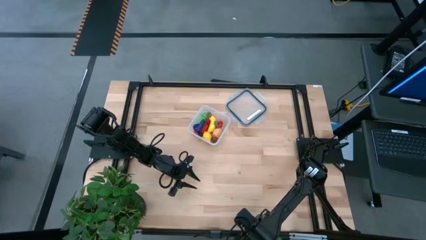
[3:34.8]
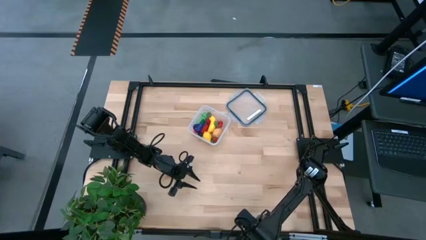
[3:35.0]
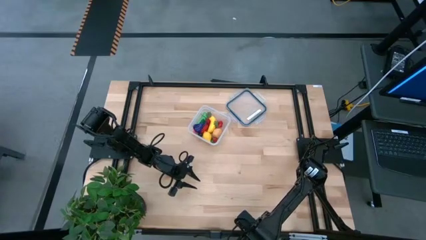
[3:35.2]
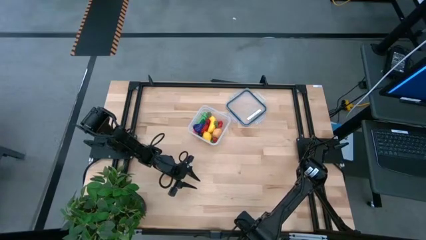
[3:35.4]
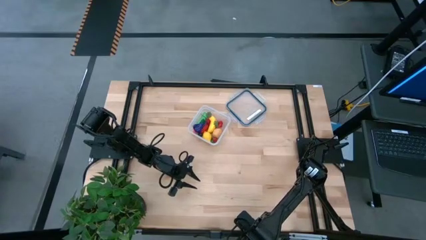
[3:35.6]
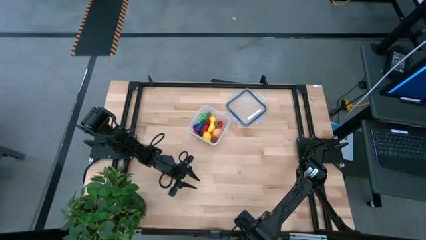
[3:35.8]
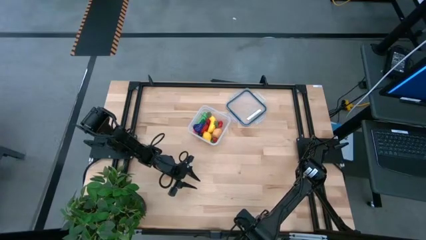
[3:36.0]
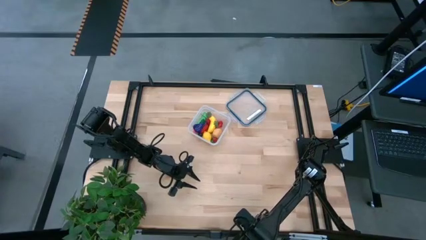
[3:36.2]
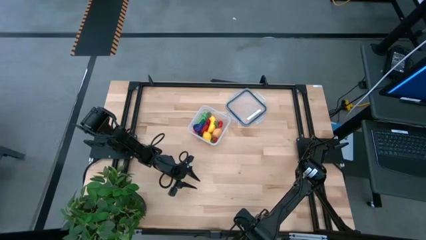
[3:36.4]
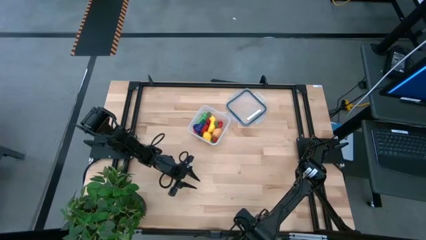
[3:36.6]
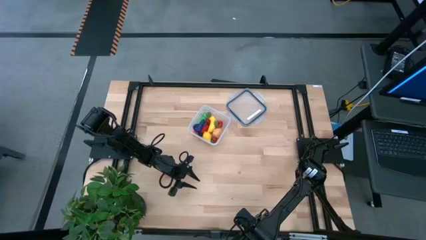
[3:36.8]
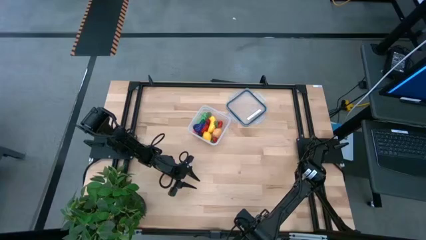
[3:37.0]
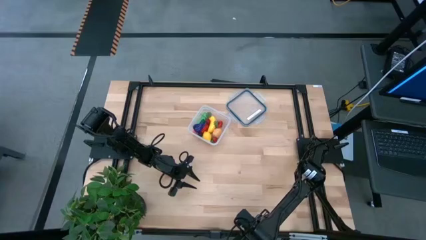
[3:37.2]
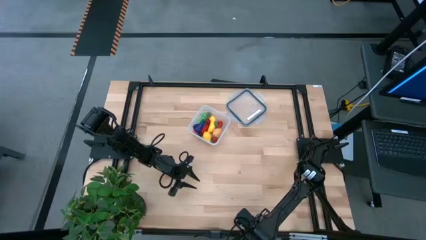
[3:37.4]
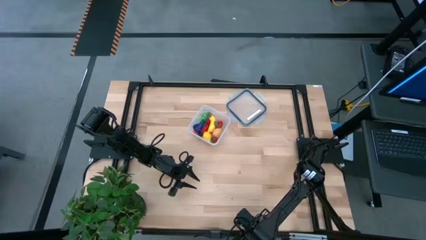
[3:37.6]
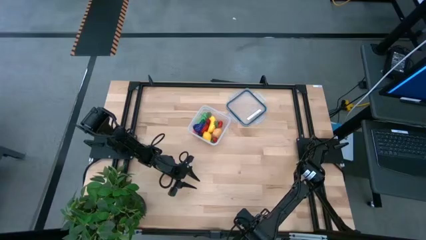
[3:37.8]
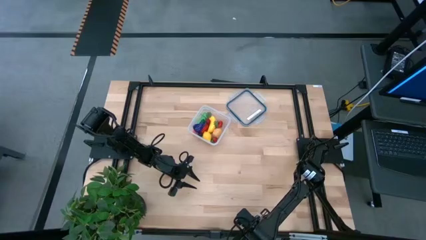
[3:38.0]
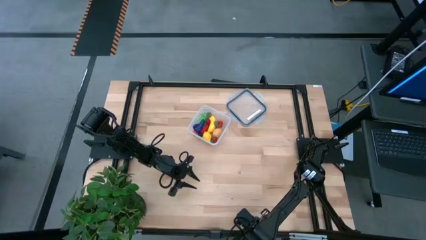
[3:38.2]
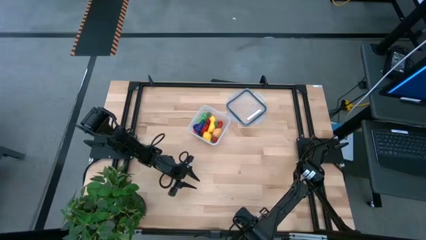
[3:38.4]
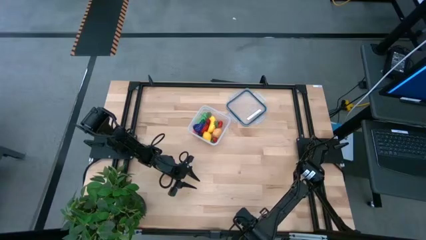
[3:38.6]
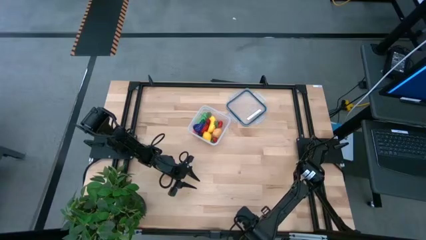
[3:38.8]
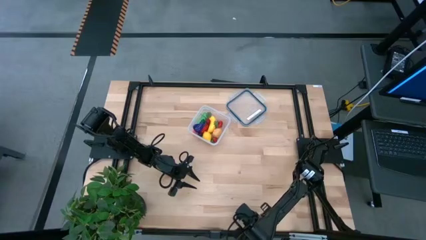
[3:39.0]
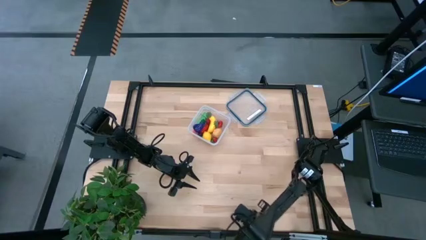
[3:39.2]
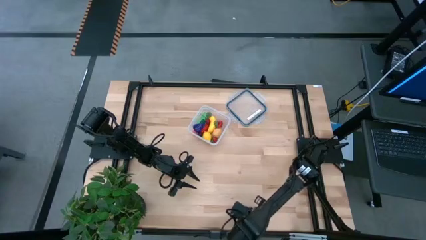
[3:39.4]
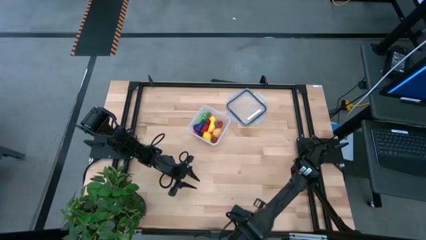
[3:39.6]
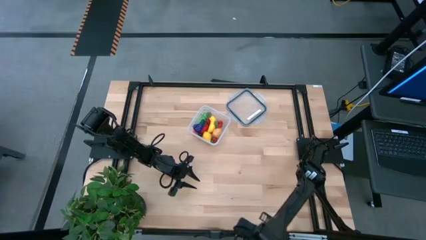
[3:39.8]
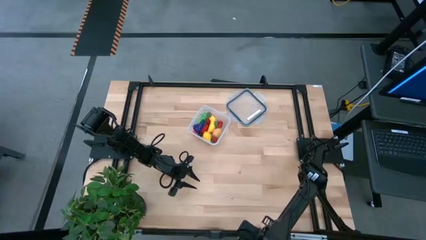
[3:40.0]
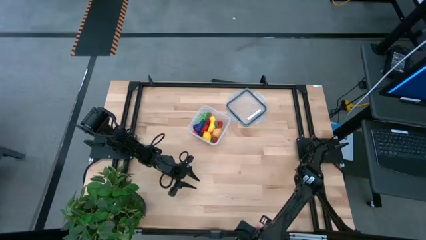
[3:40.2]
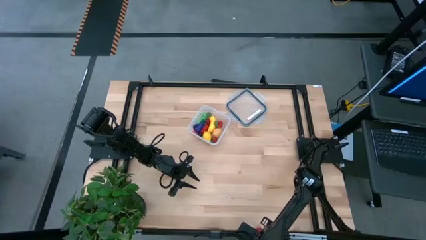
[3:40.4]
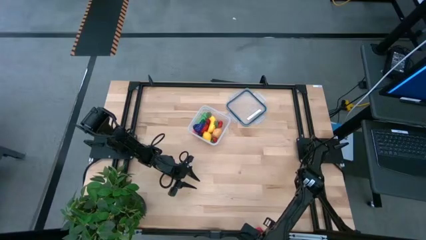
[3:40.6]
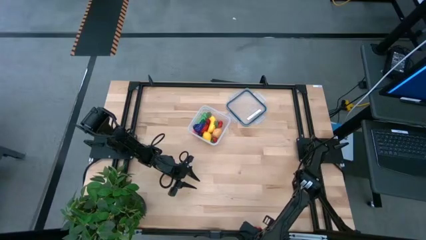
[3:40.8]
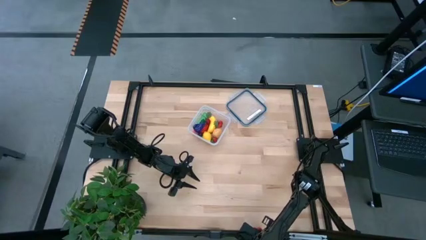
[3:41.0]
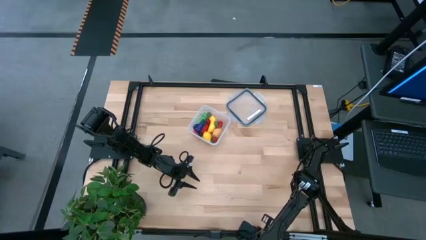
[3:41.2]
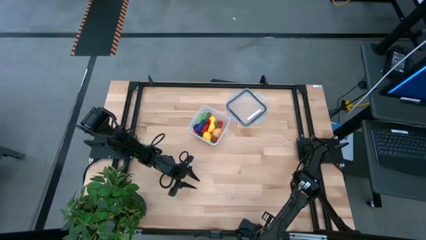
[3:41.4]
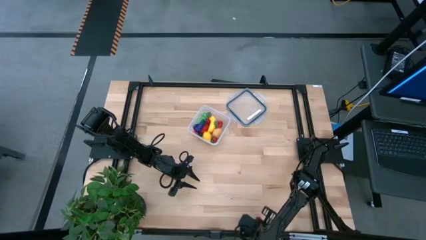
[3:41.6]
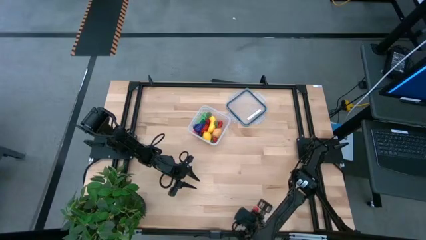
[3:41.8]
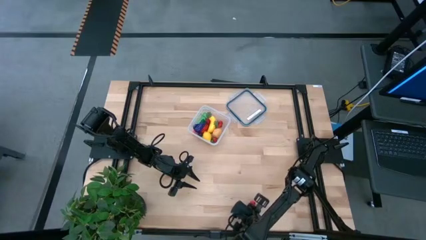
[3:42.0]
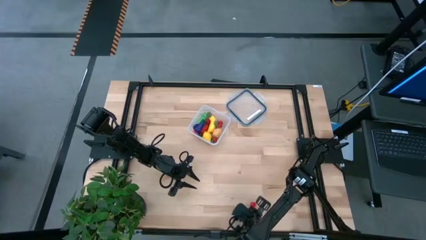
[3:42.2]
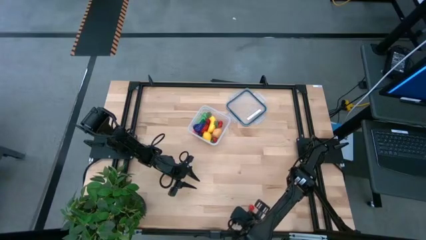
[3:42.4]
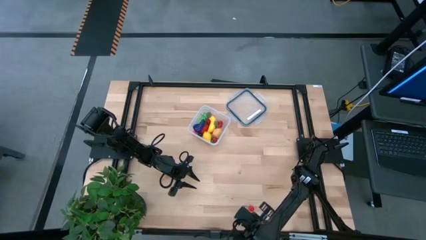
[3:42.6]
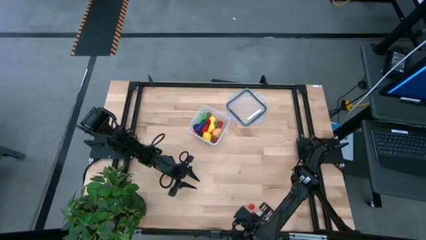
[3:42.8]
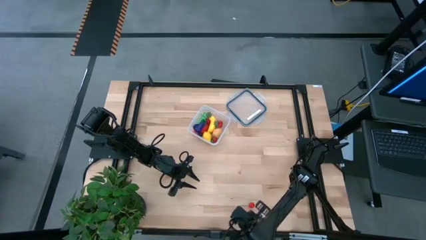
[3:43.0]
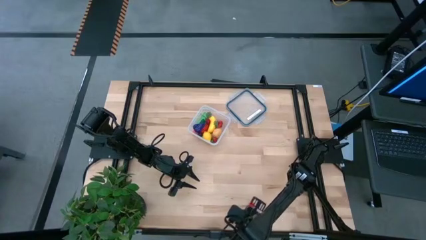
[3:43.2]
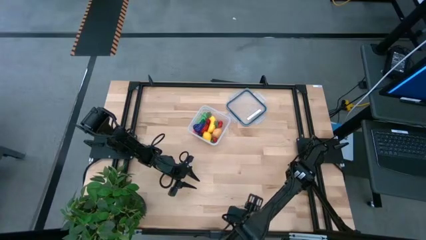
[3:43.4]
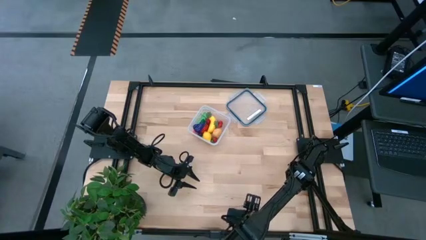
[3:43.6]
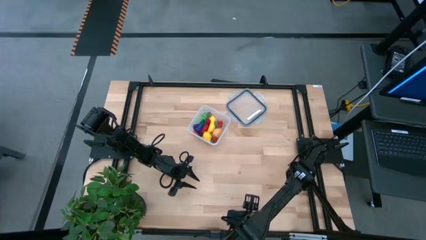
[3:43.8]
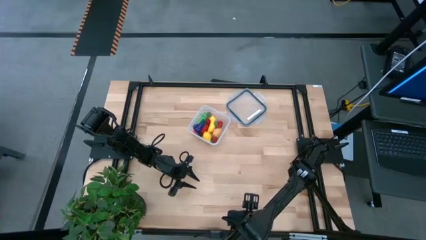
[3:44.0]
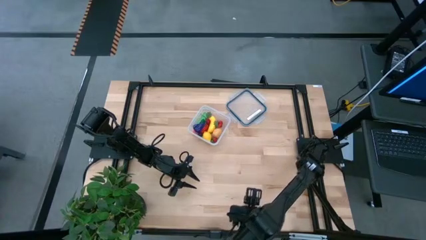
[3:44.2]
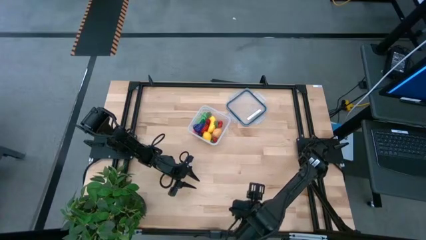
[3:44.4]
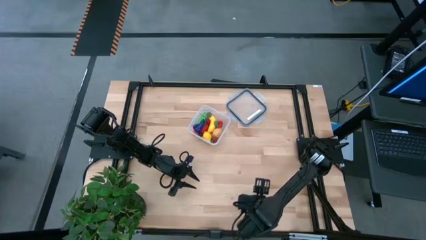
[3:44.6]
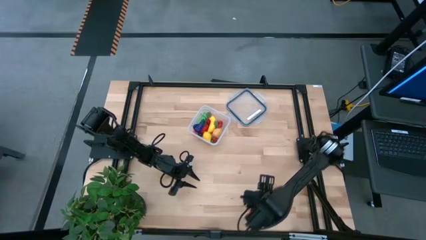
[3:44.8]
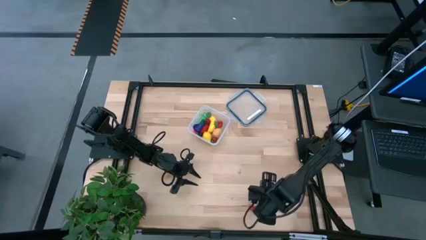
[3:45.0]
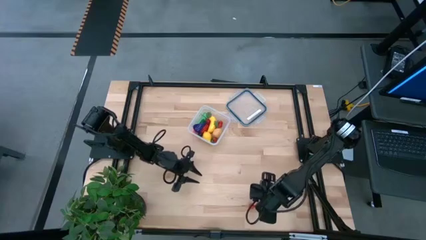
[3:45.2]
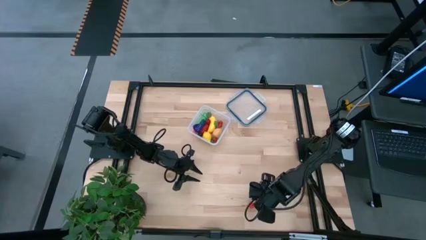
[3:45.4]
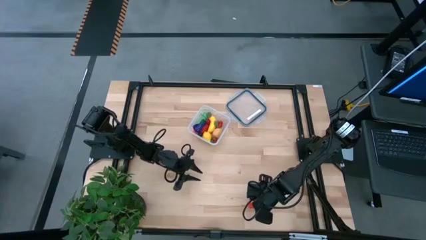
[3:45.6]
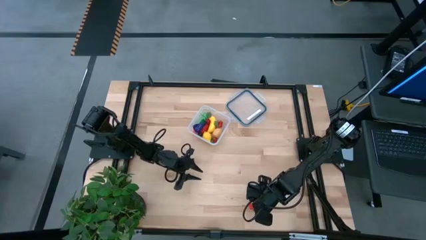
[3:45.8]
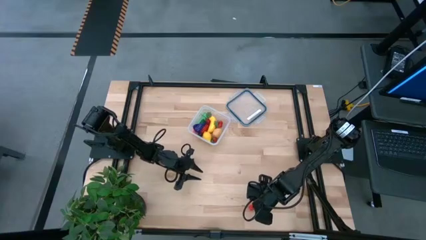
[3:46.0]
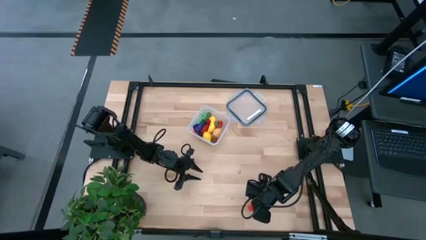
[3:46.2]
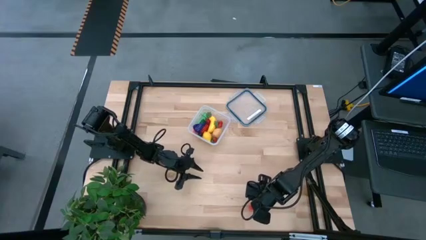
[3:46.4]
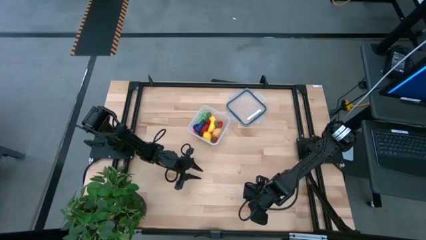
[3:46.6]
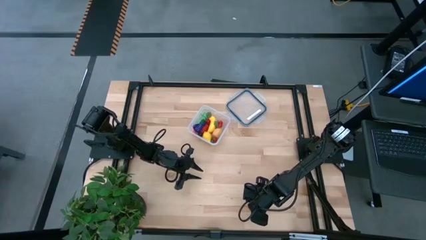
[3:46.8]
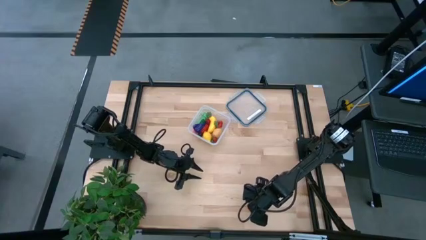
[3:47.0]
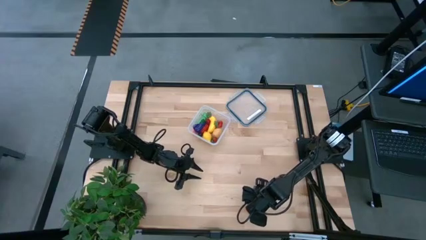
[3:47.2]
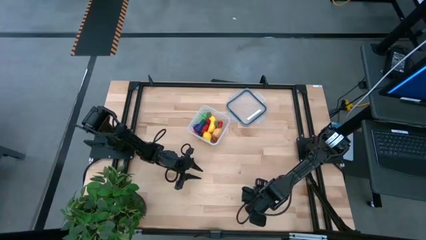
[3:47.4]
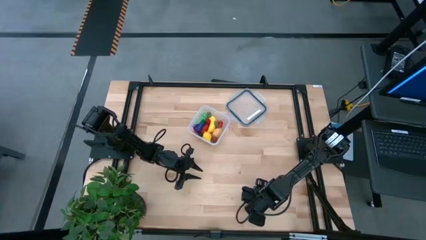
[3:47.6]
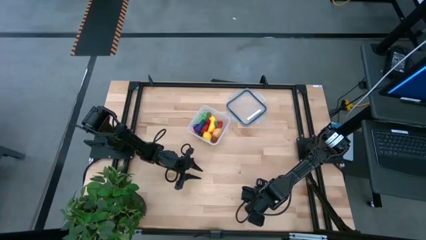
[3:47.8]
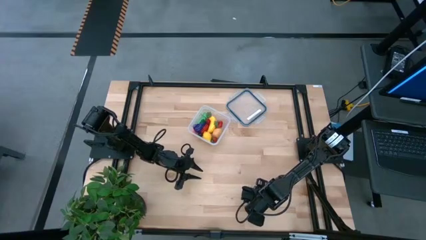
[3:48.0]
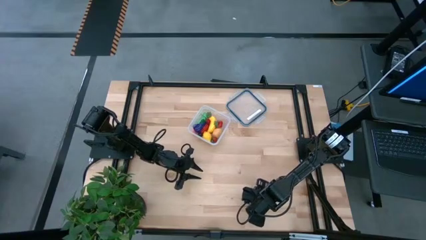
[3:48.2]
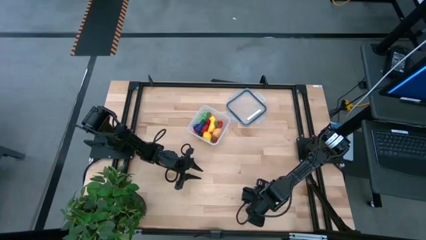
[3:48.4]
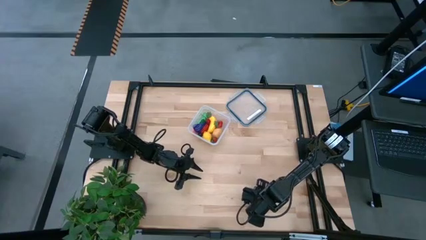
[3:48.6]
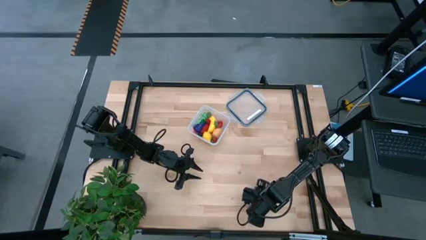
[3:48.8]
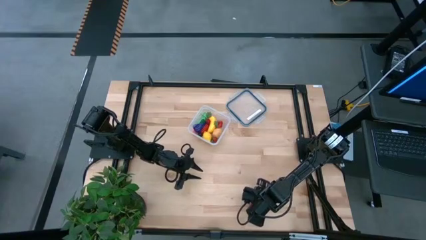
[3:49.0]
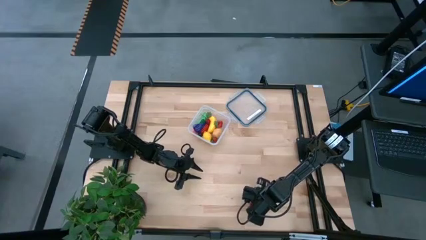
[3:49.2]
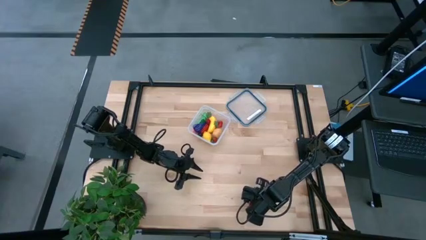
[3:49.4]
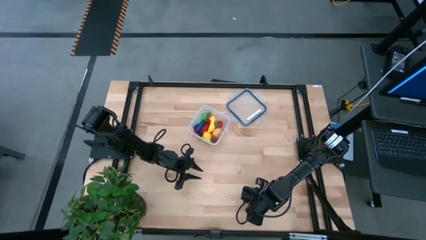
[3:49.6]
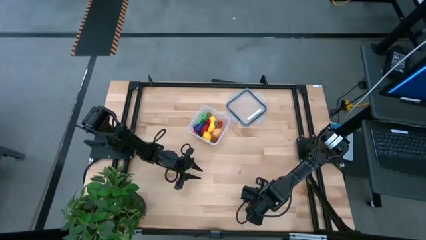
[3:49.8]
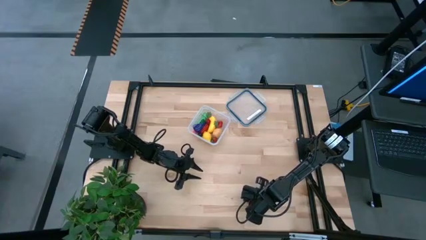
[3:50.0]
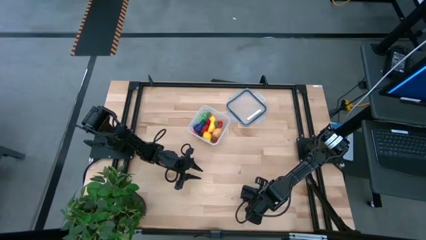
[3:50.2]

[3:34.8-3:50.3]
Task: Pick and placing Produce into tupperware
Put the red cherry into the transparent container

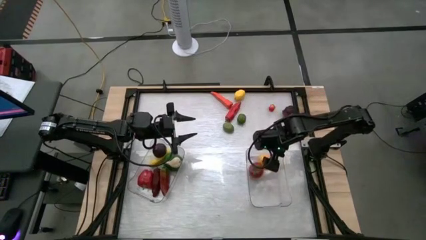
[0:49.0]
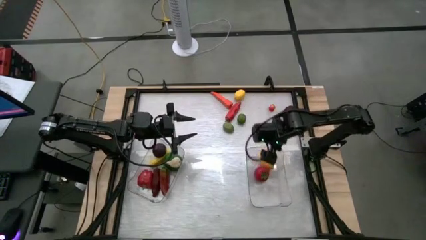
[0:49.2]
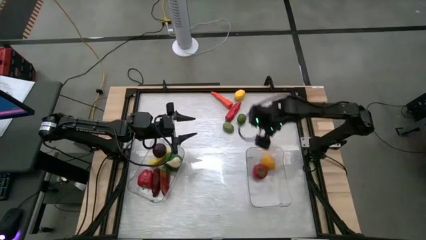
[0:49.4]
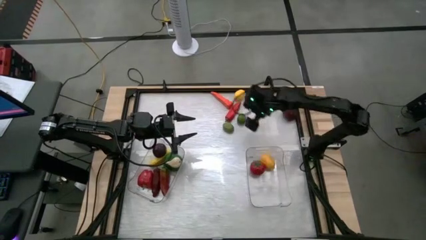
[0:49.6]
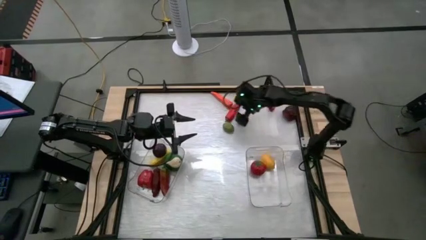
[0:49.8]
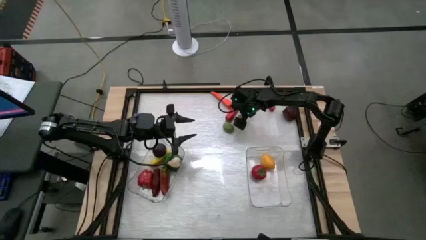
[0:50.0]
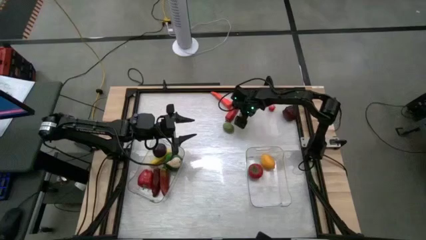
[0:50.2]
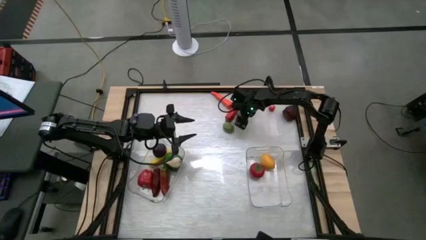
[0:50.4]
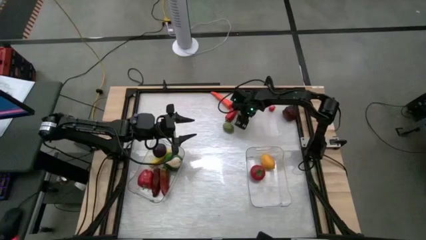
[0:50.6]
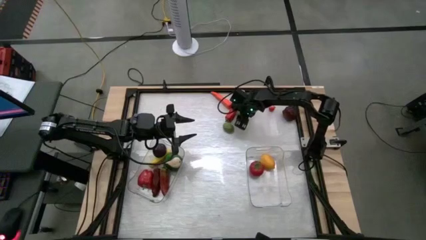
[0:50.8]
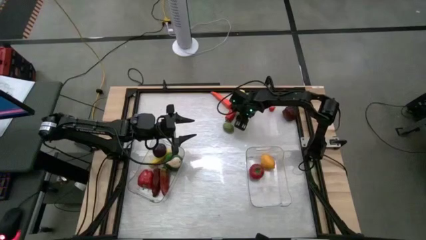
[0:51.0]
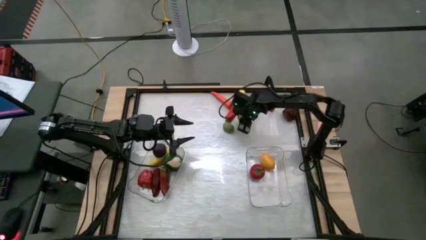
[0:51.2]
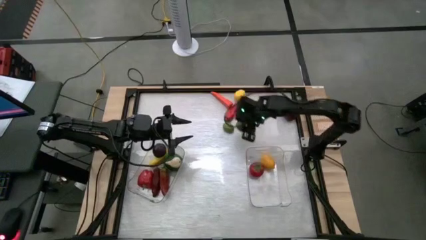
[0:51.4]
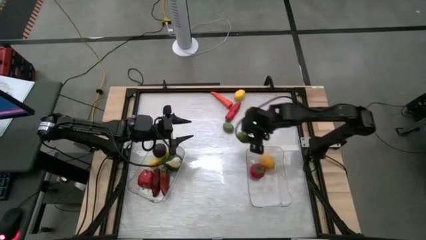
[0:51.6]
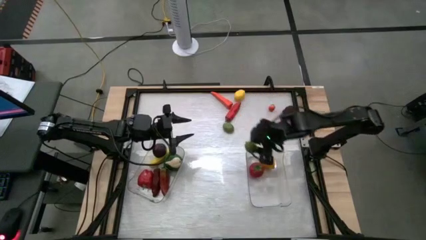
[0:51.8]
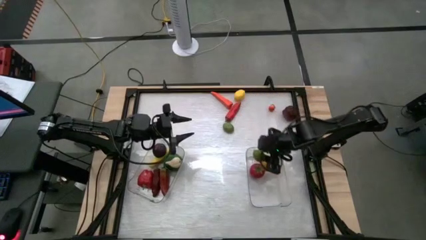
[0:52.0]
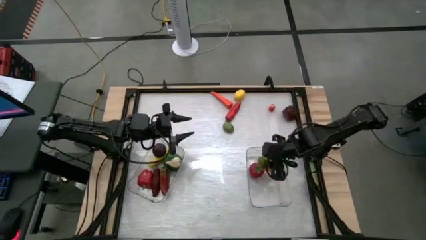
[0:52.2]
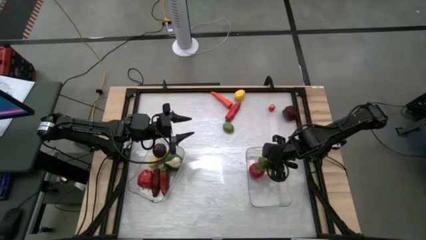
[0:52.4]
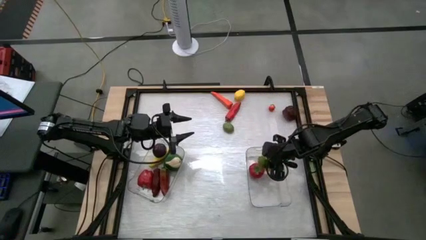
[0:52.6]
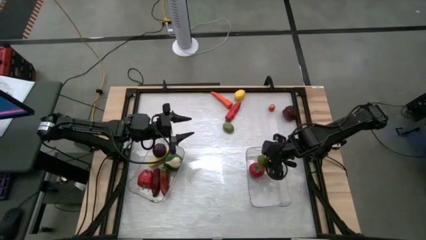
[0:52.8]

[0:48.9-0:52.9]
Task: Sort produce into baskets
Put the right green lime into the right transparent bin
